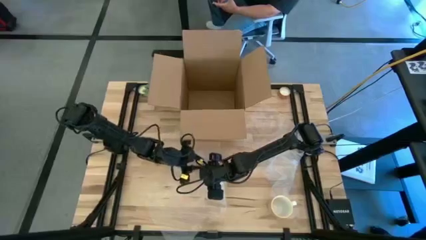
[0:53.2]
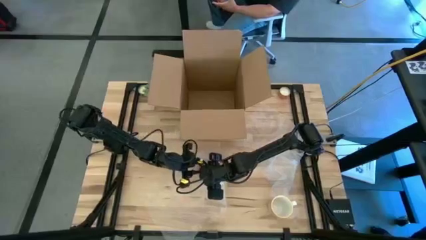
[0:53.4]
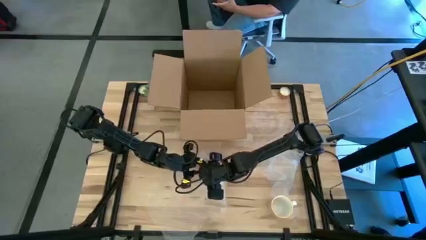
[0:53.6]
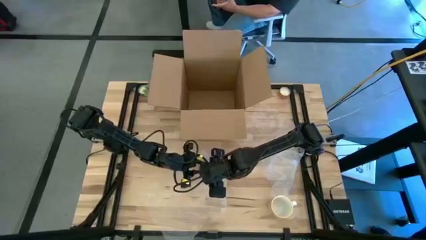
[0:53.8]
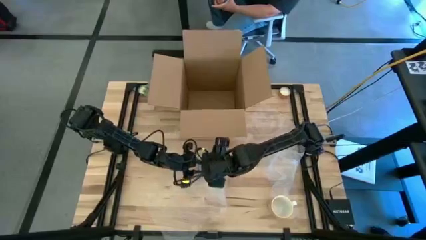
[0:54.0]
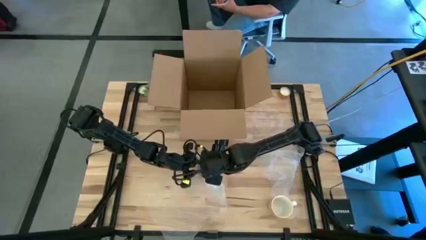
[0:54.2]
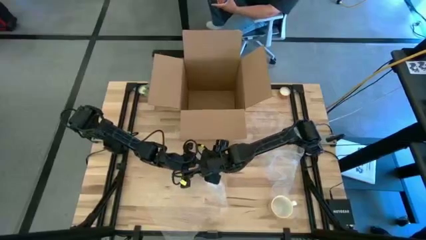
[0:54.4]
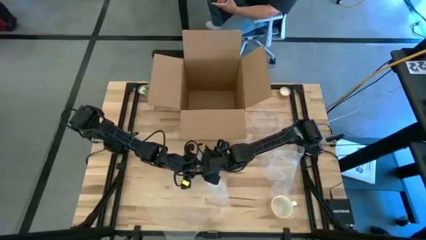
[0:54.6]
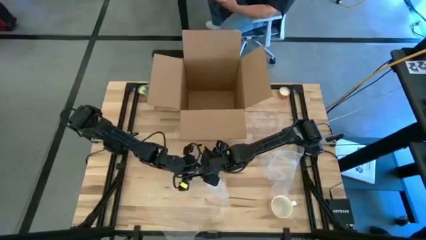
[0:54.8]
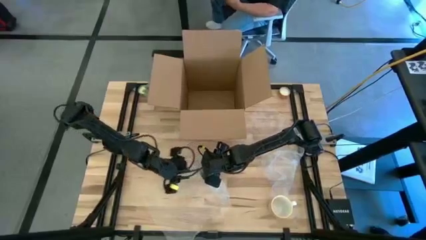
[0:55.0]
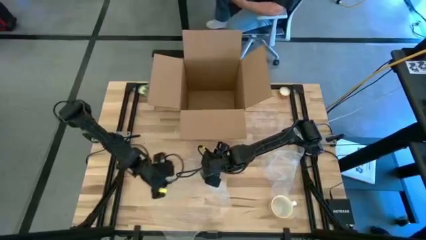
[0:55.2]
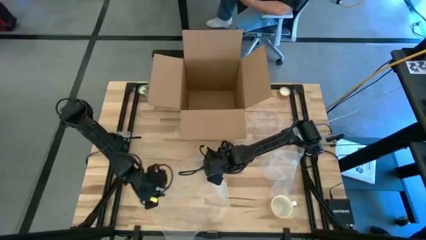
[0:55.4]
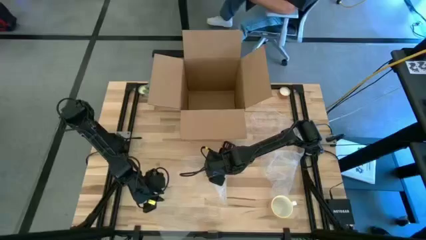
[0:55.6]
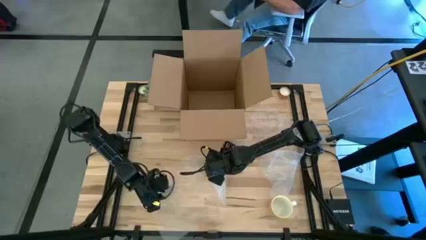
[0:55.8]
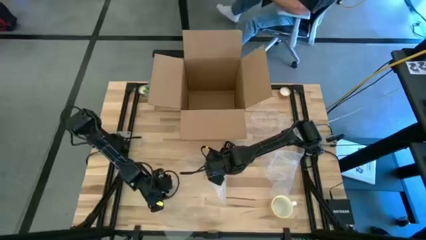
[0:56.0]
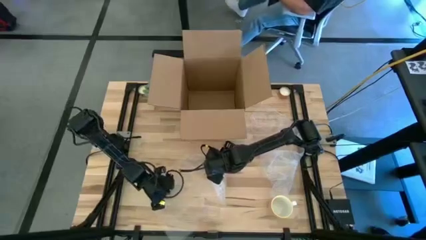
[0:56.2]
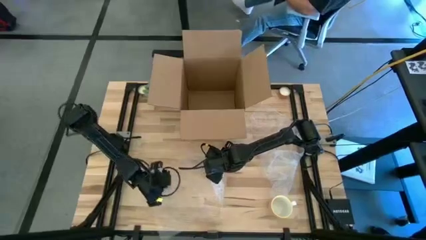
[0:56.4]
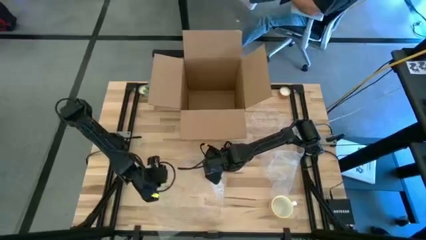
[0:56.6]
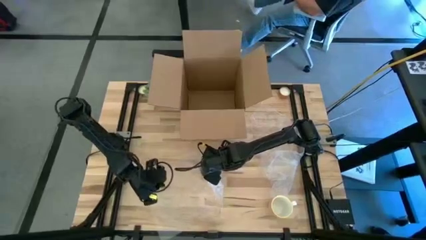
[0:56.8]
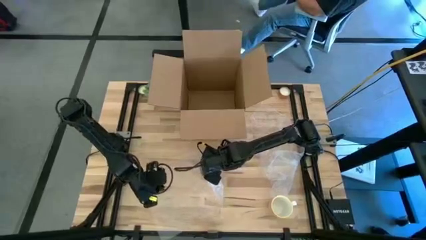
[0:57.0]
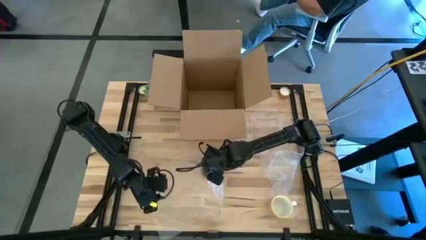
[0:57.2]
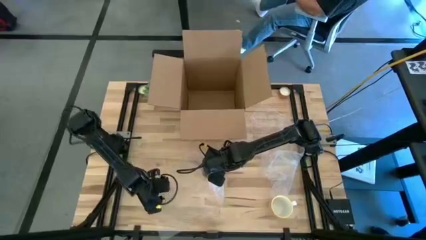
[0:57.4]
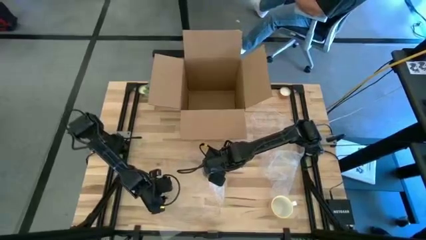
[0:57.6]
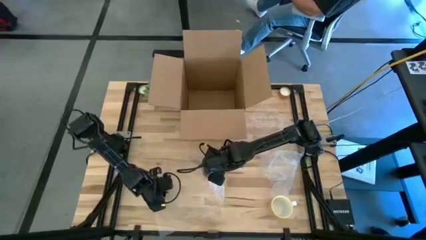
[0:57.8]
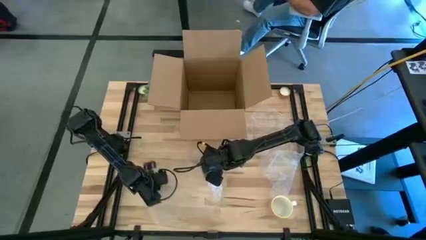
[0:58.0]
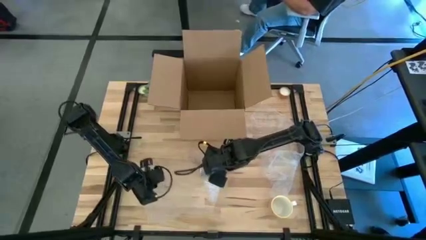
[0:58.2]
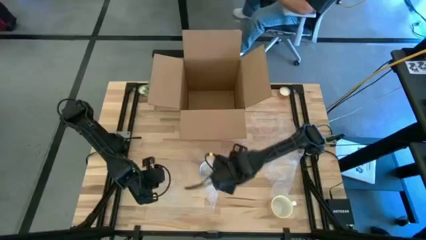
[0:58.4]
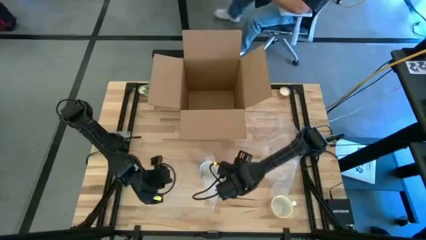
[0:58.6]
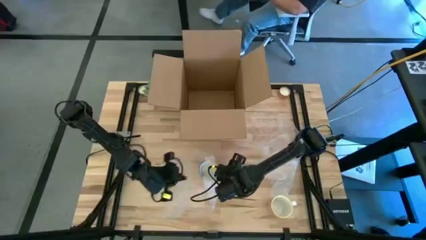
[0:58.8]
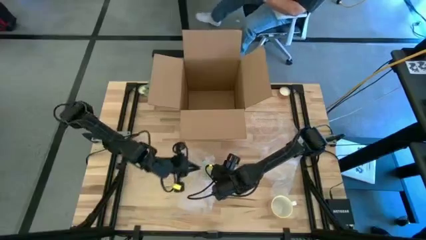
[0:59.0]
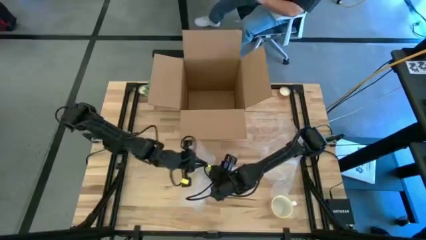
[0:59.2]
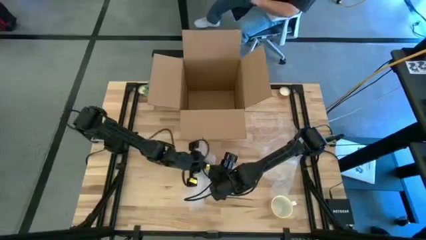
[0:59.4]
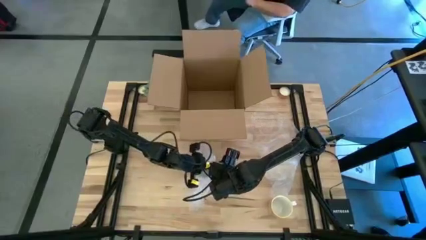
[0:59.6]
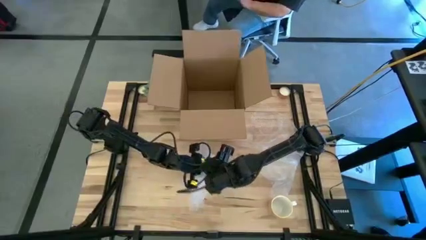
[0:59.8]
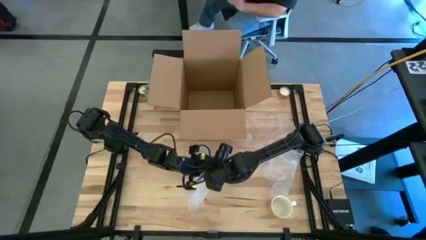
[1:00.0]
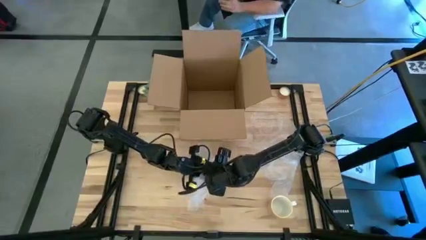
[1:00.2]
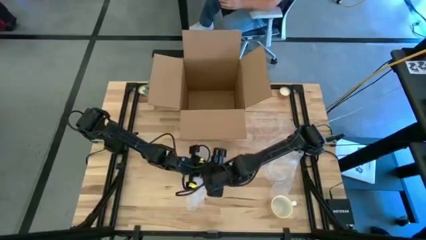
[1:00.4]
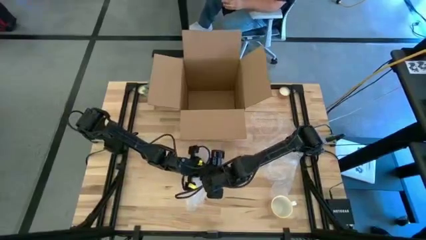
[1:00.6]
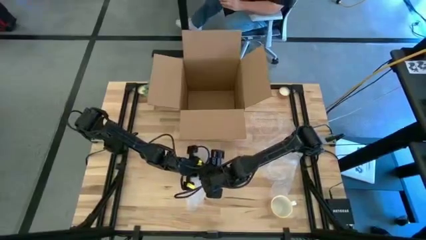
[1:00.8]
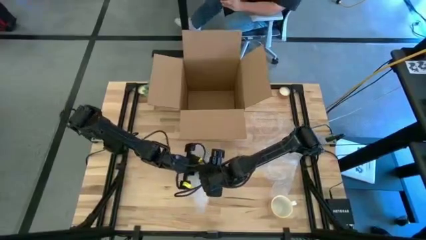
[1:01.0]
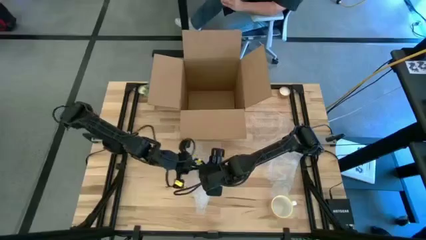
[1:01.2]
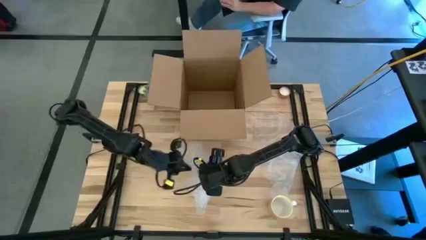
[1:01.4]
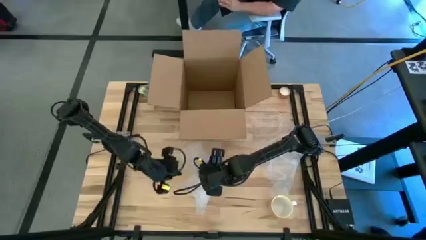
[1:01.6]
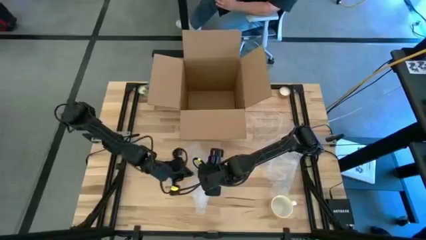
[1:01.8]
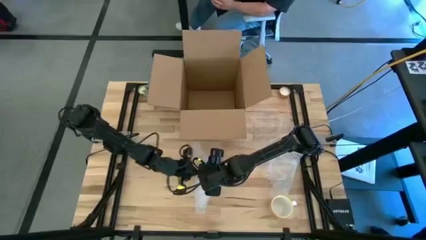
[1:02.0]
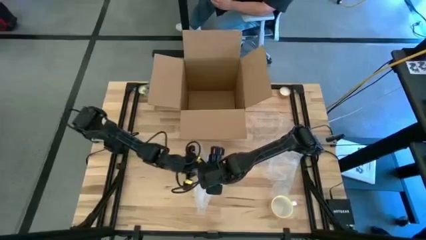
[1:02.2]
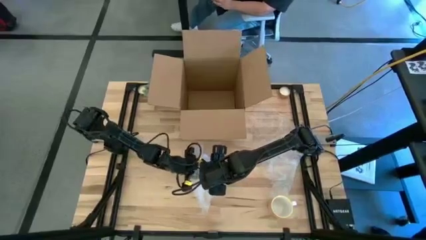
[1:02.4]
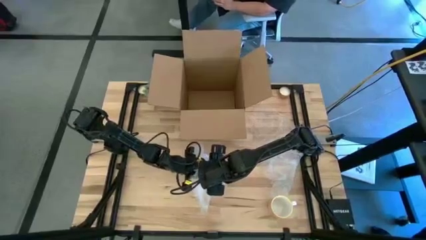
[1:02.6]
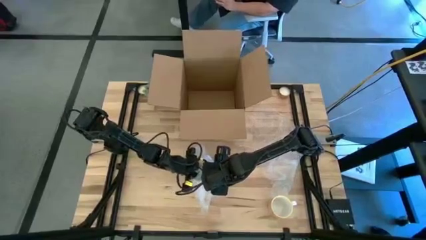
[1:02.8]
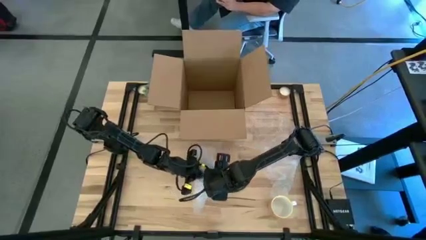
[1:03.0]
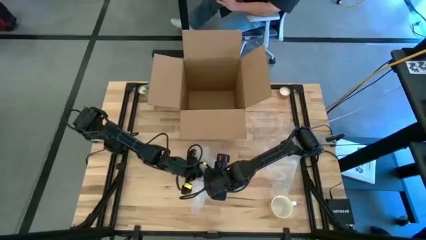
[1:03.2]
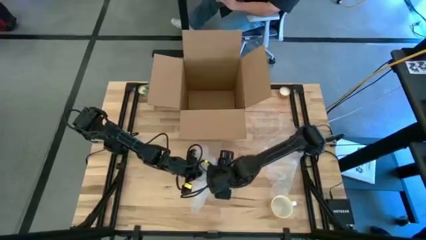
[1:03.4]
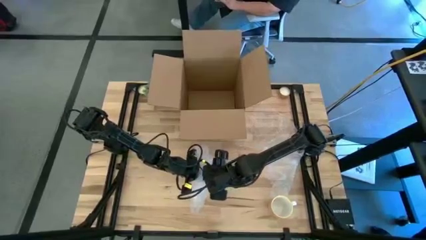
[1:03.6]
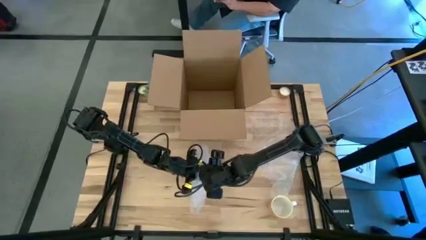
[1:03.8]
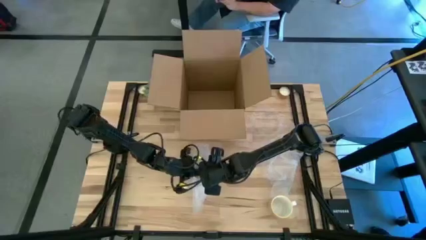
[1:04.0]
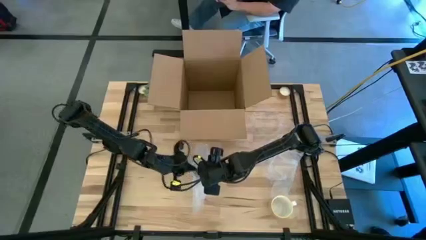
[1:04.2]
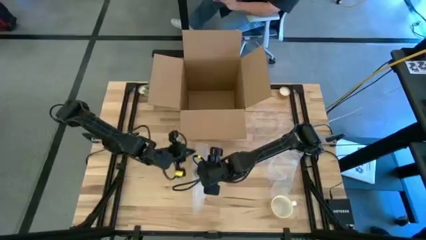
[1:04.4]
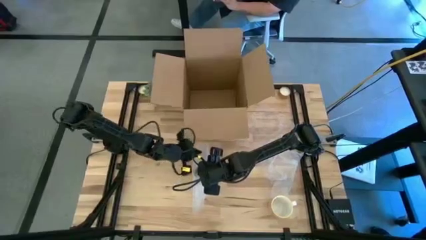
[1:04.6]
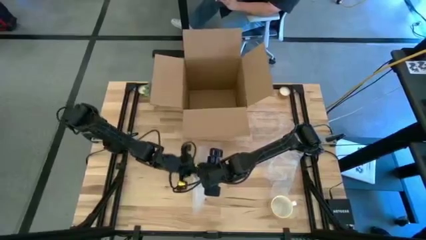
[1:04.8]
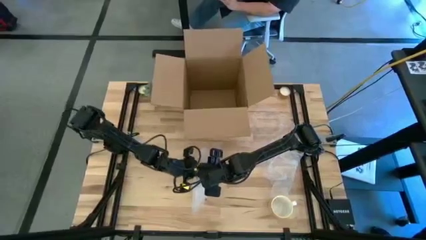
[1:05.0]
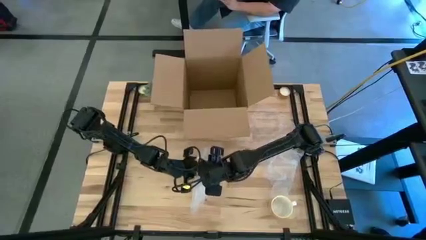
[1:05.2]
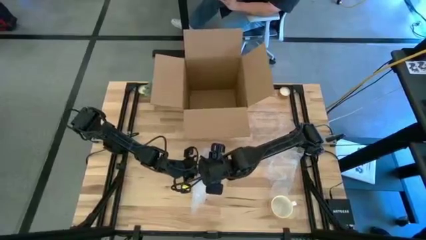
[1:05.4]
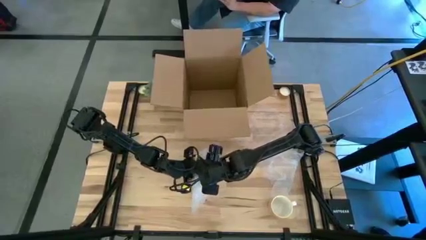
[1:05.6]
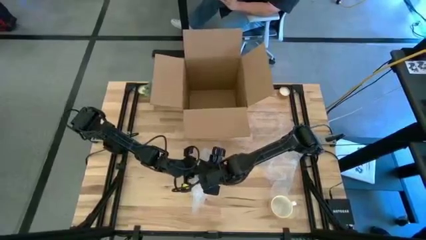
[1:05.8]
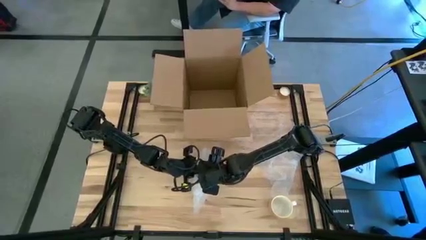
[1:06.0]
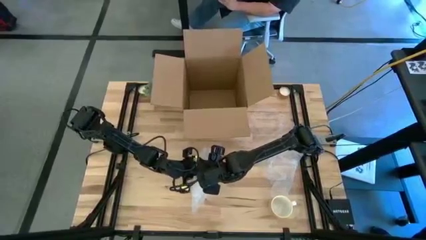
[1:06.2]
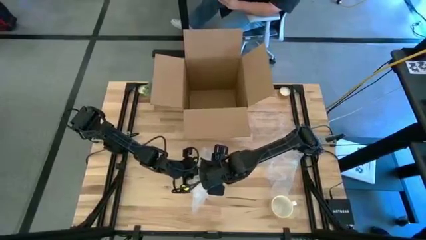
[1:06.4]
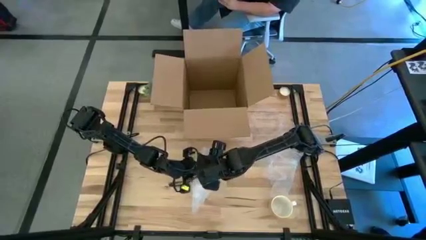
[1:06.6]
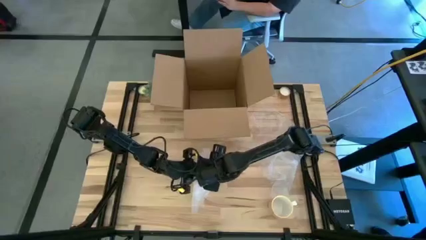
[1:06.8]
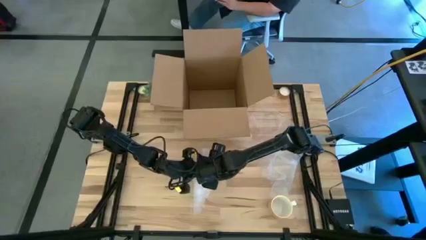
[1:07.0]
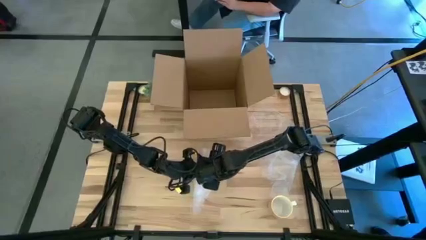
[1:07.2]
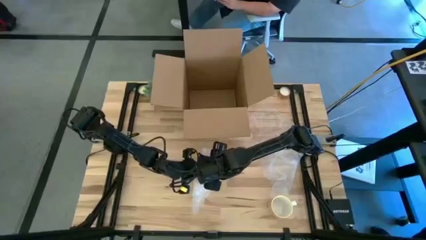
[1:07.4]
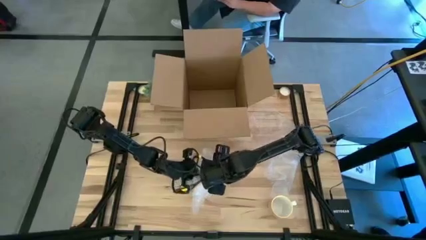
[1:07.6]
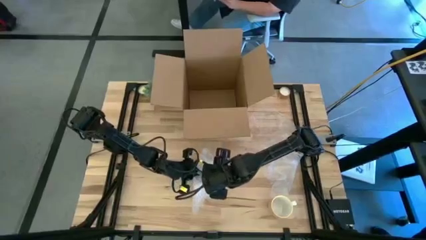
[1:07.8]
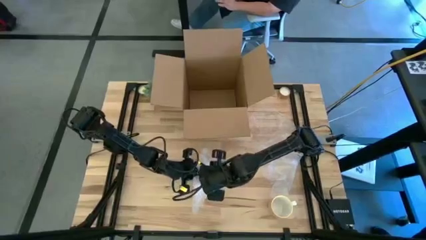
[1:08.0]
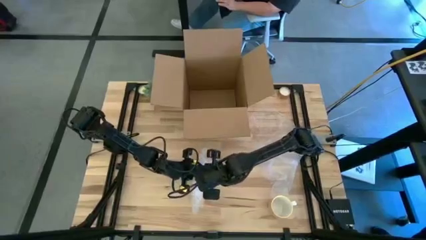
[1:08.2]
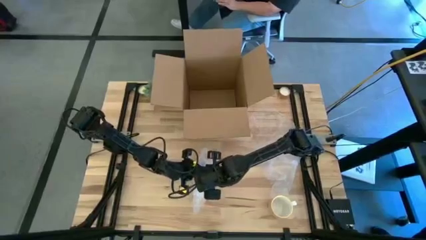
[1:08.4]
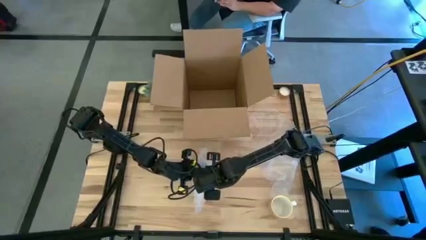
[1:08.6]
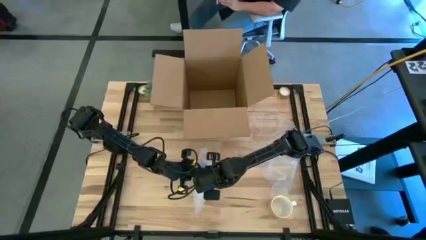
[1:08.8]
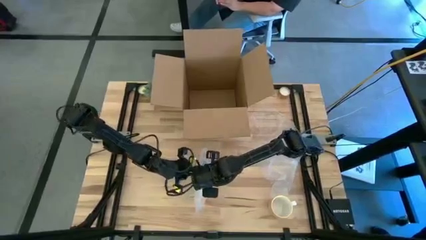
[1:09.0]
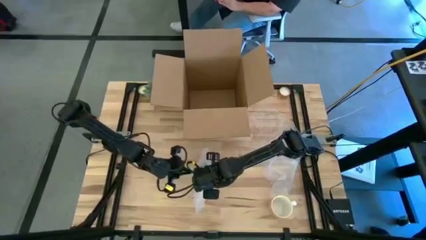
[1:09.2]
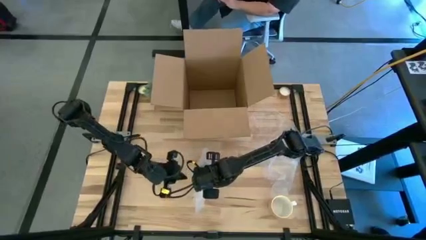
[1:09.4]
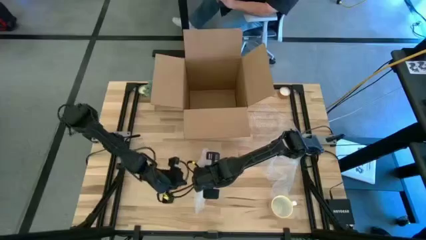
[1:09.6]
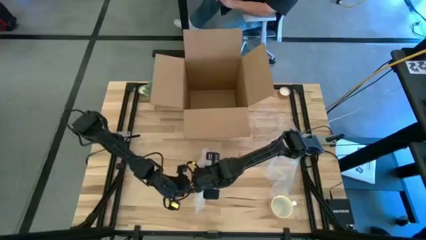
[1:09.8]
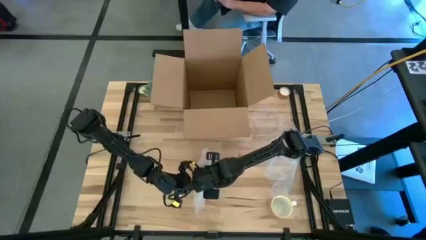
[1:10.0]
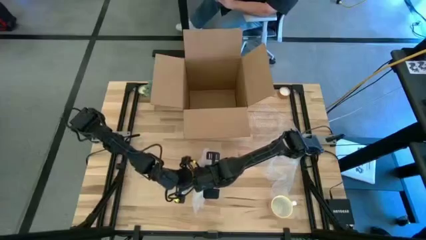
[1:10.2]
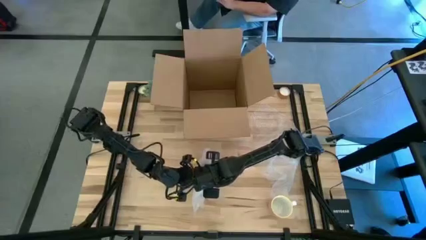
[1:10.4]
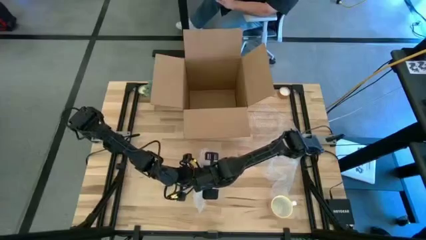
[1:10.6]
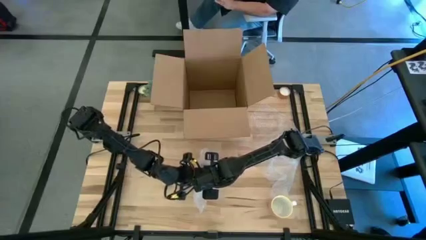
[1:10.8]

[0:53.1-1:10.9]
Task: wrap mug
Wrap the red mug with the bubble wrap
